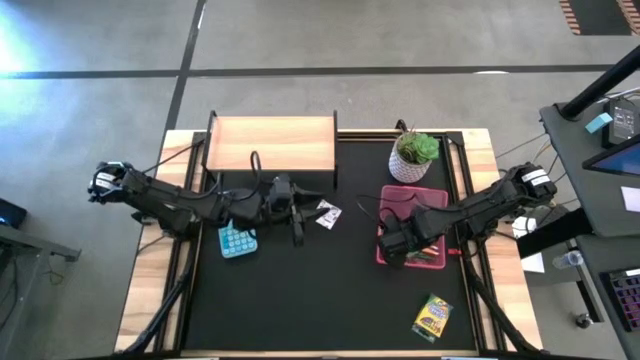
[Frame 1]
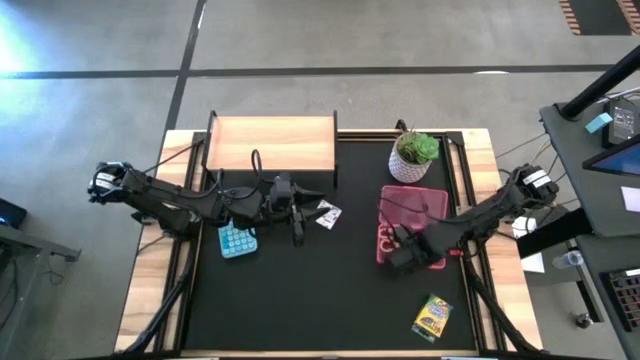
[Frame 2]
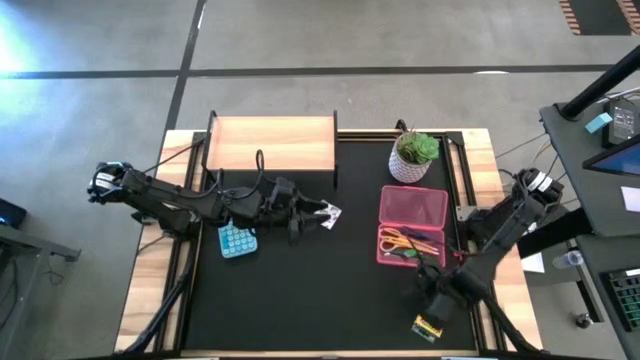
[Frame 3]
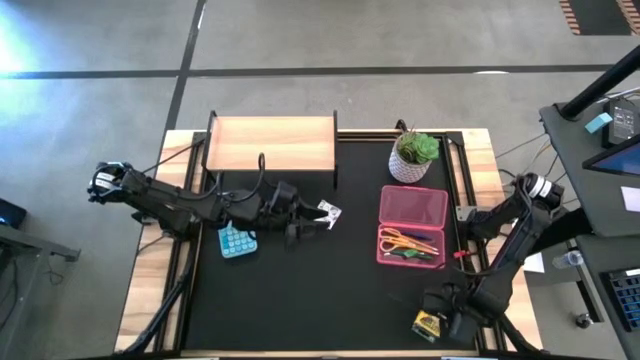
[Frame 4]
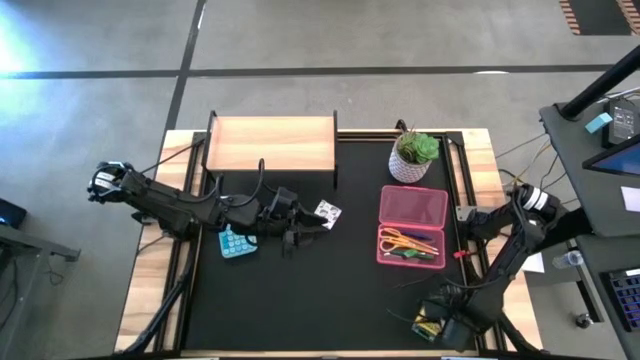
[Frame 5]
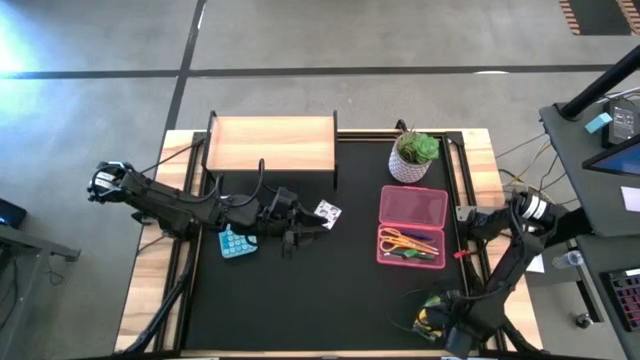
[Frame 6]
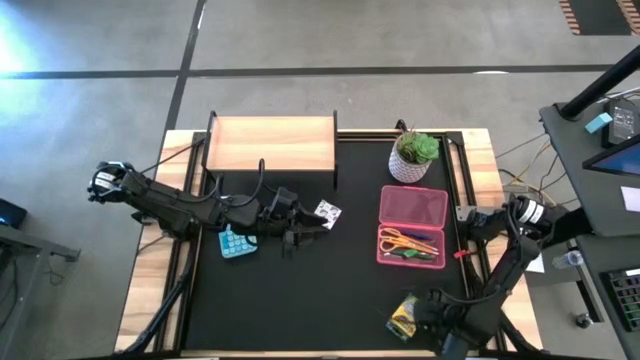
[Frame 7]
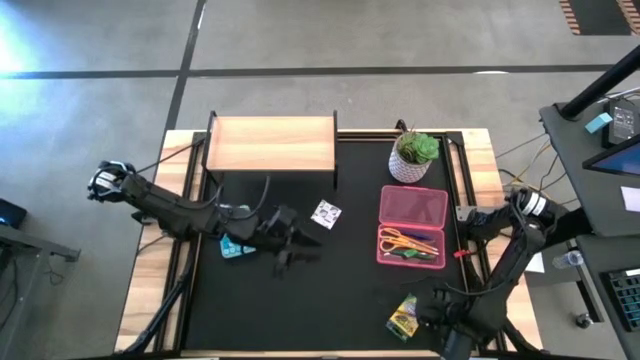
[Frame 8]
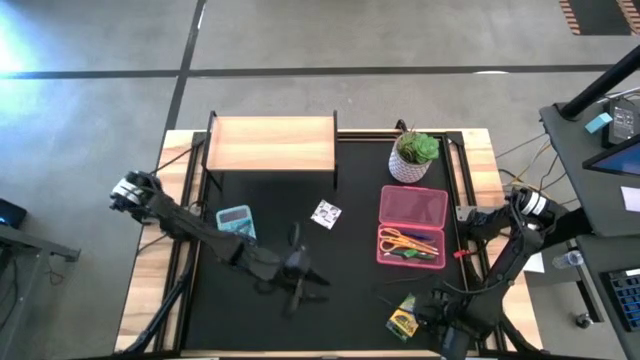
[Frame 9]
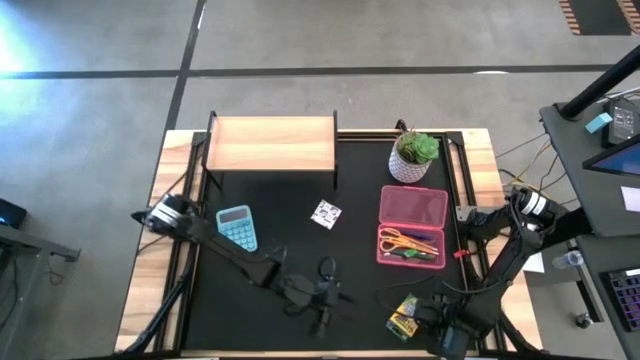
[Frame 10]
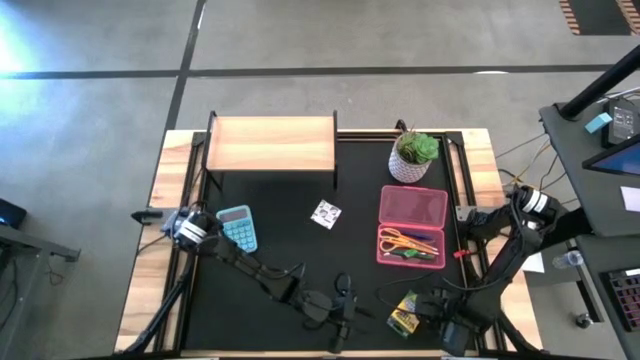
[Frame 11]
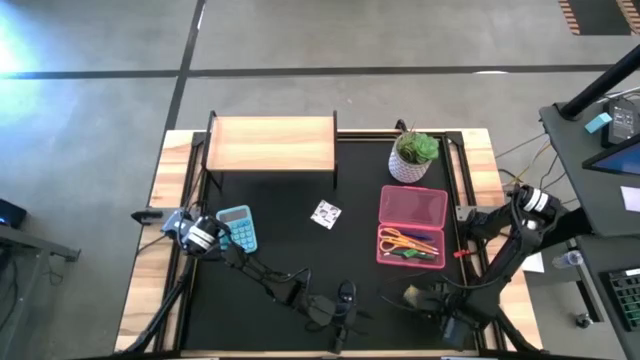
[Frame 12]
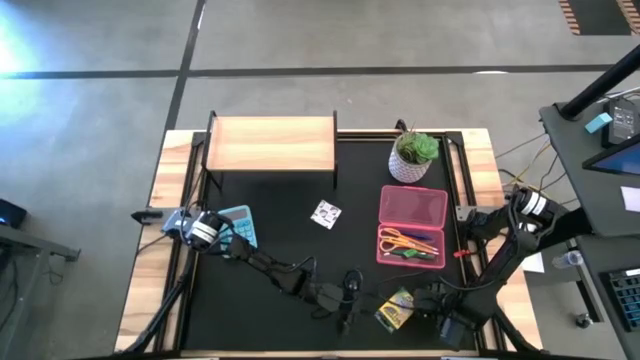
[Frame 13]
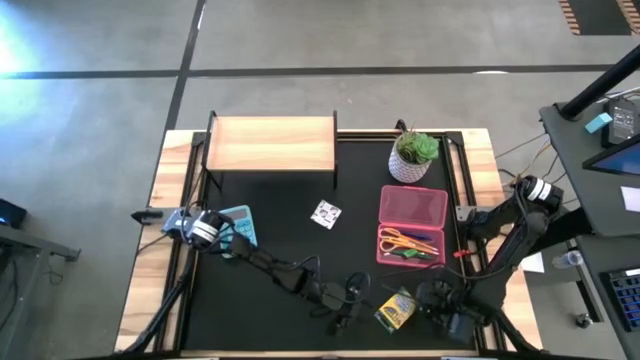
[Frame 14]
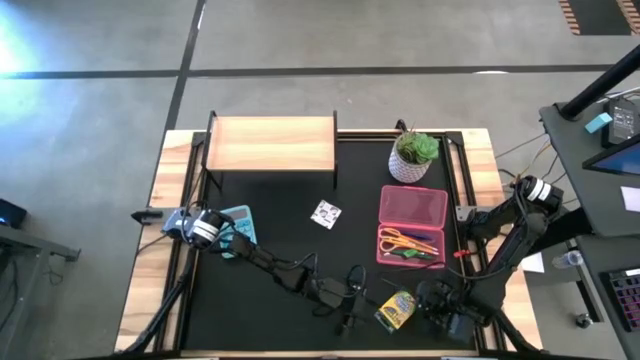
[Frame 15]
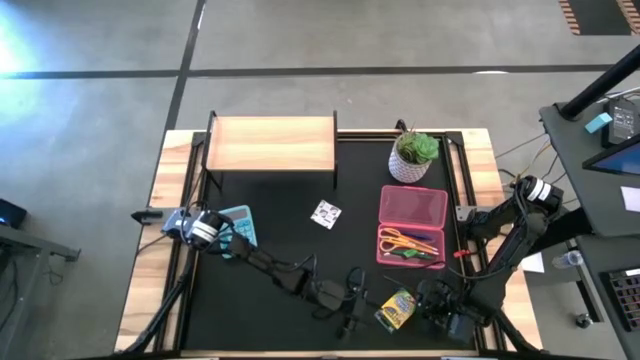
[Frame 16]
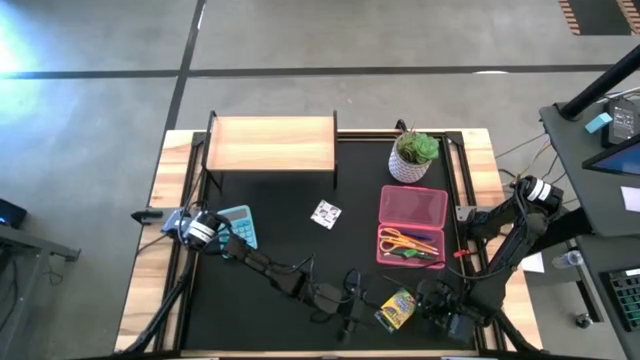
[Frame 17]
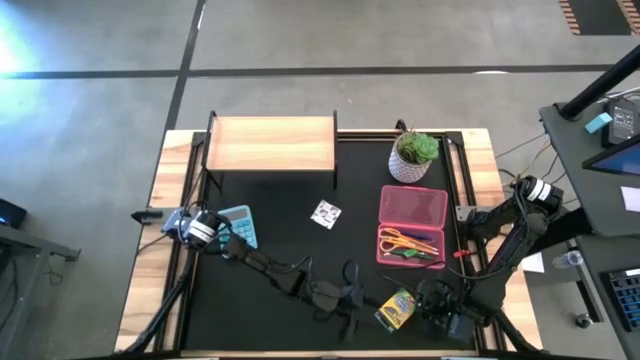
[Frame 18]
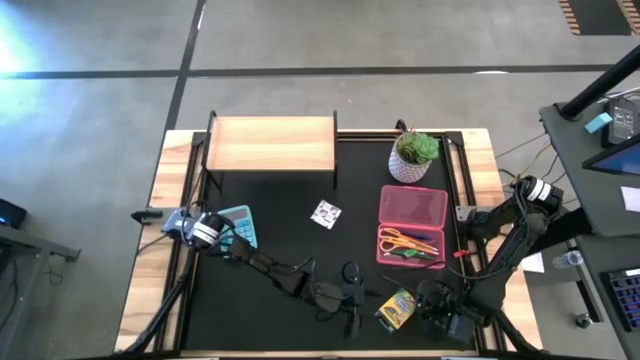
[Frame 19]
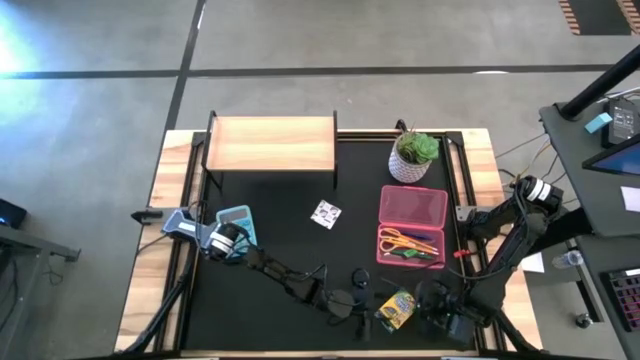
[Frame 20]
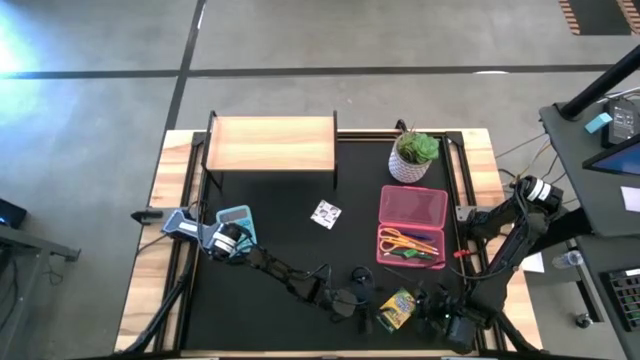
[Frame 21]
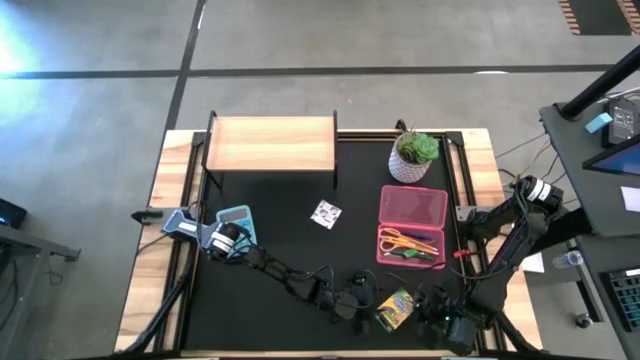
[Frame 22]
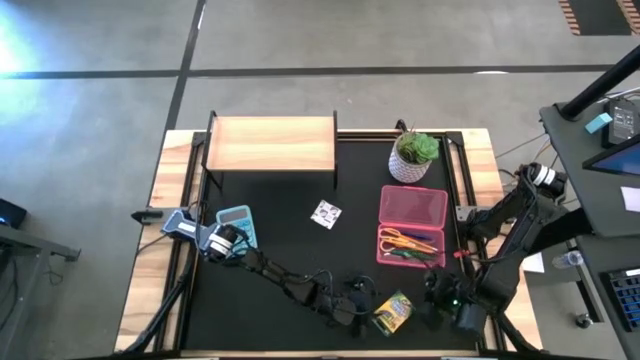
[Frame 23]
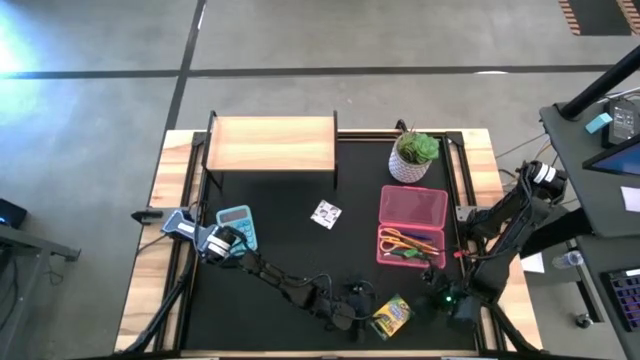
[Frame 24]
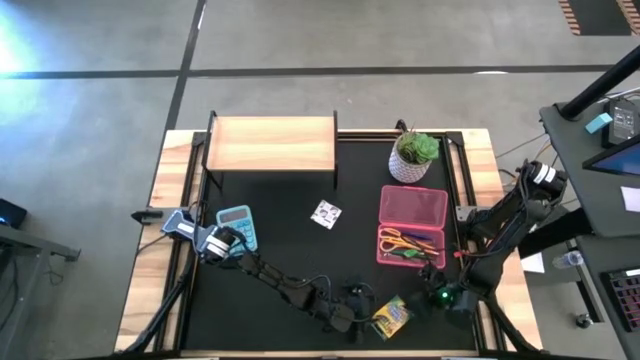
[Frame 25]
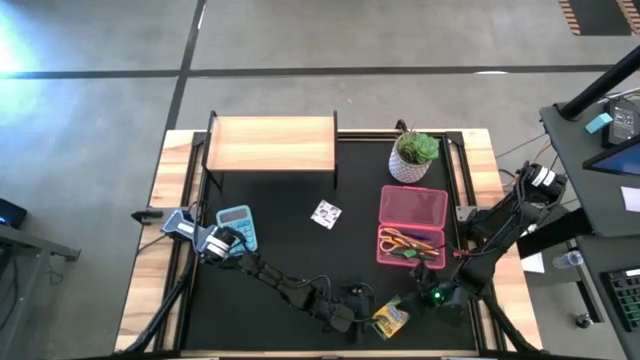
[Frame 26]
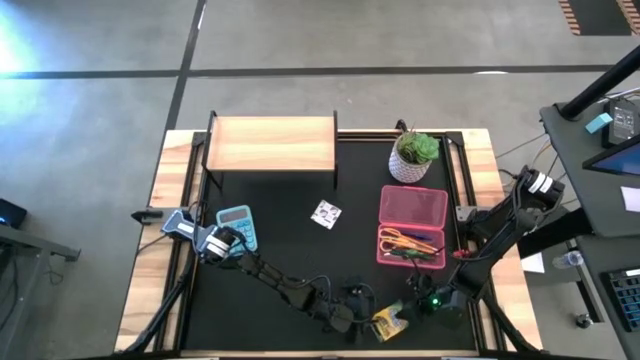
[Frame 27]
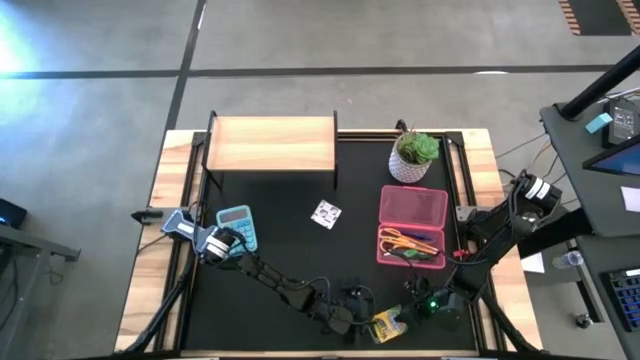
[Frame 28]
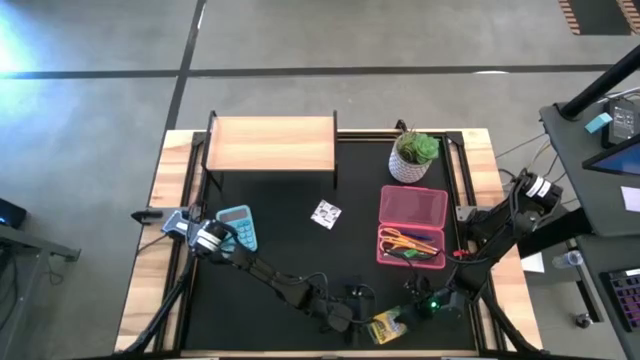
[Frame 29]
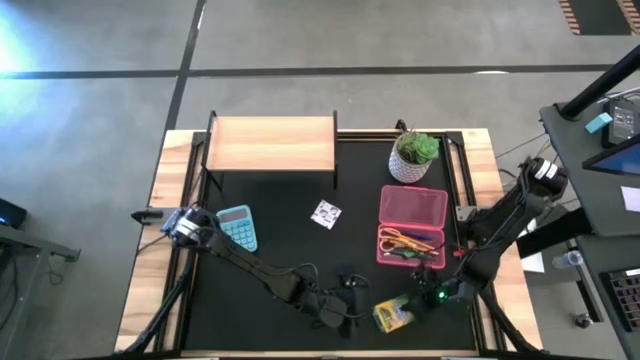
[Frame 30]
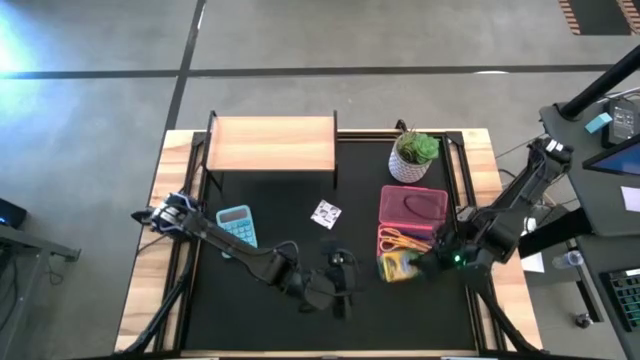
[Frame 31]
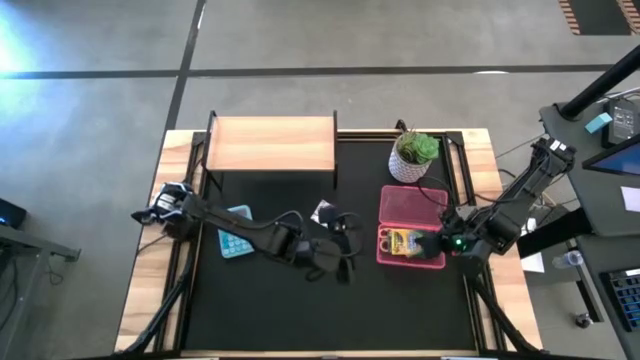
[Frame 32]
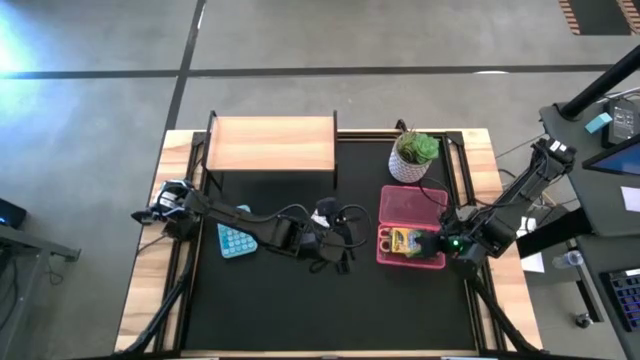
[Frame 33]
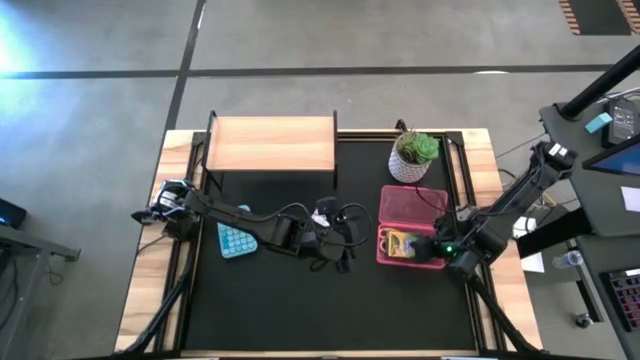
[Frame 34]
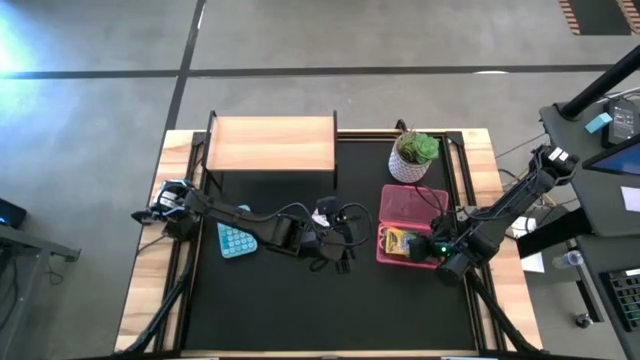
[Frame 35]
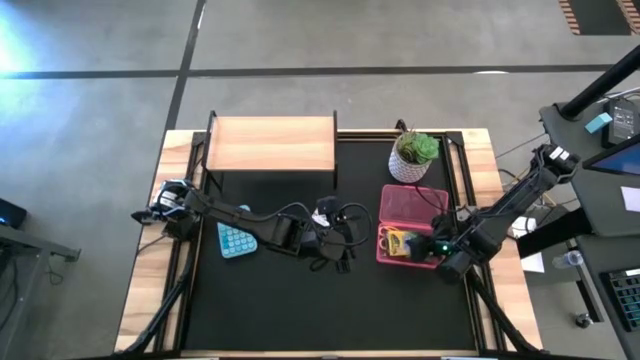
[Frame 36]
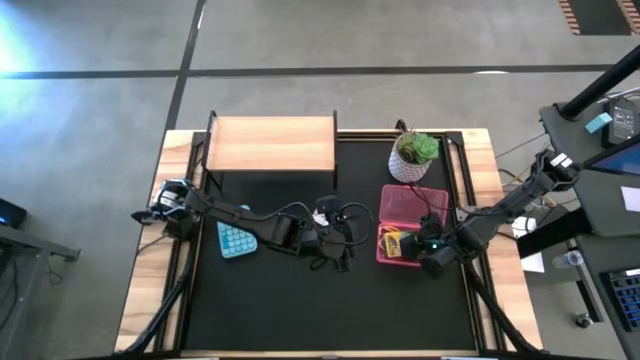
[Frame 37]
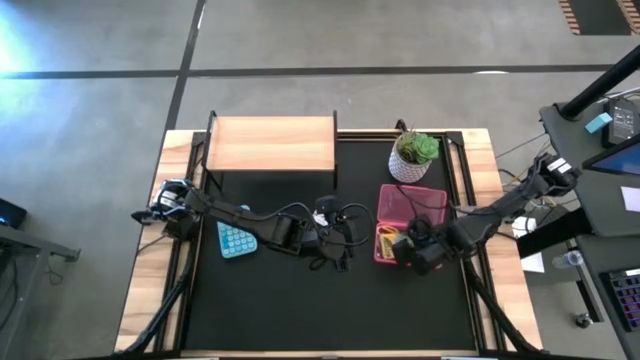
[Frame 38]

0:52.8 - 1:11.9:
Task: Pack school essentials
Put the box of crayons into the pink case

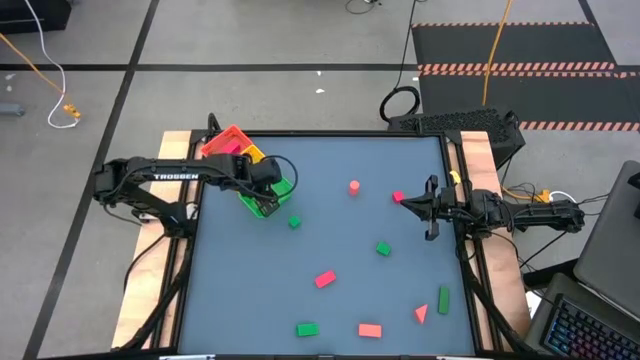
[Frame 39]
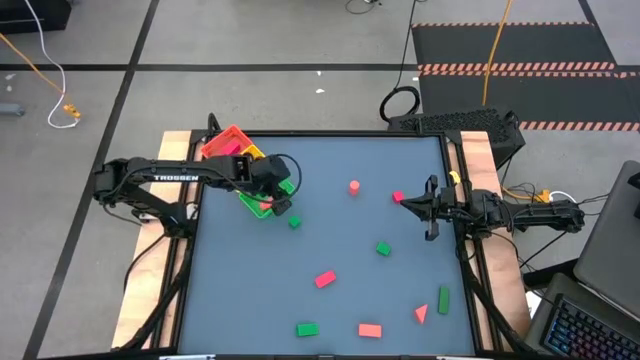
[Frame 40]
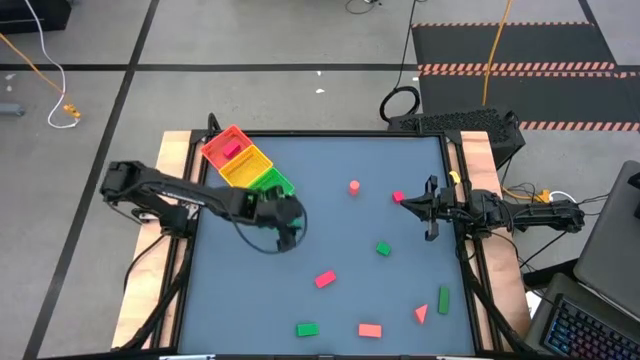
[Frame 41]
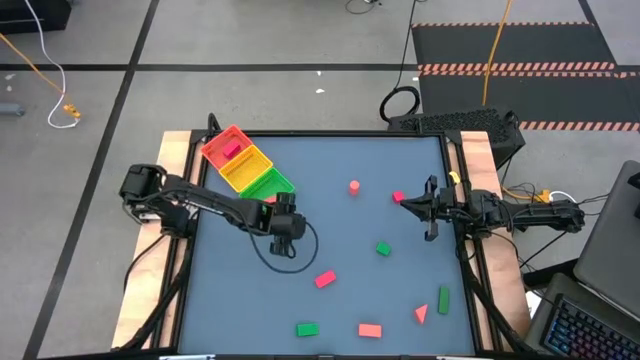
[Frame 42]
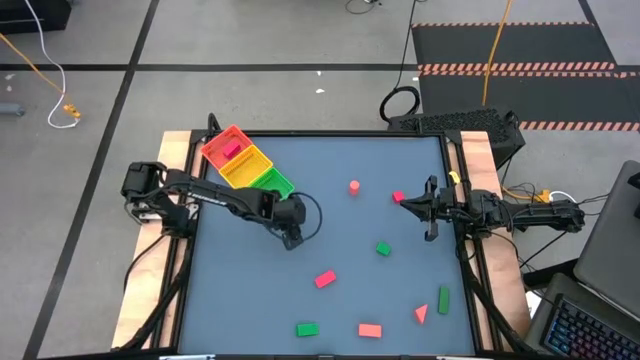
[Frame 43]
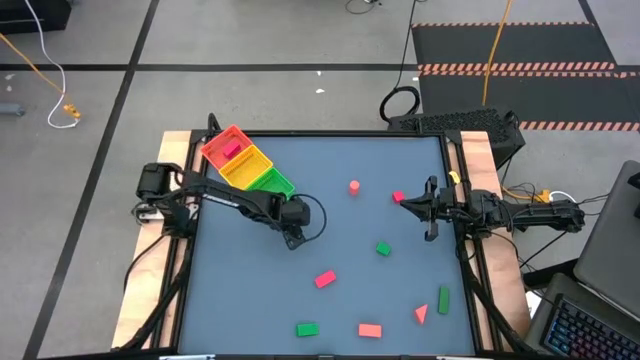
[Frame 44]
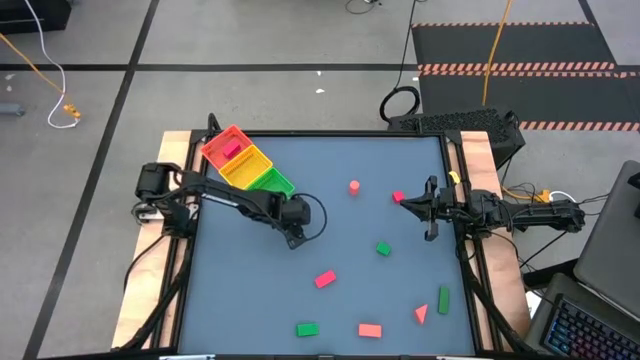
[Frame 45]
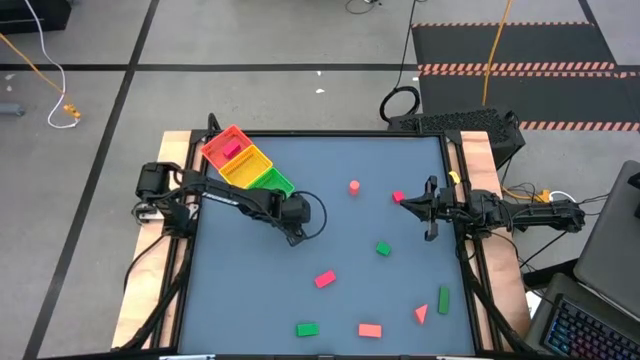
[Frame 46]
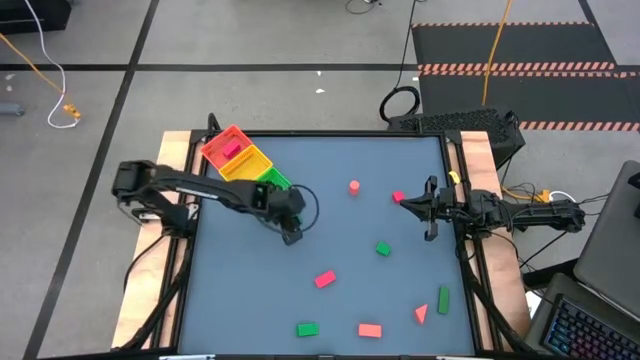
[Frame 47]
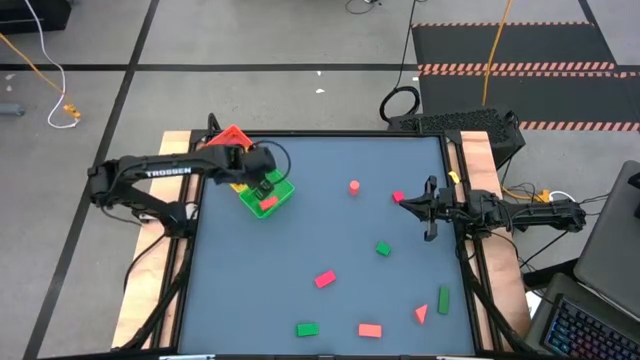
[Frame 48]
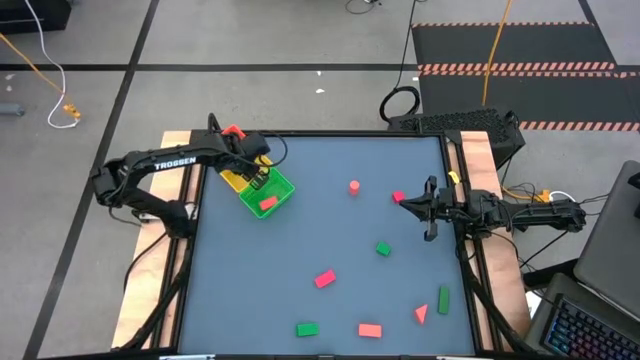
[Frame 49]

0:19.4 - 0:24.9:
Task: Sort & place blocks by color
Put the green block into the yellow basket
